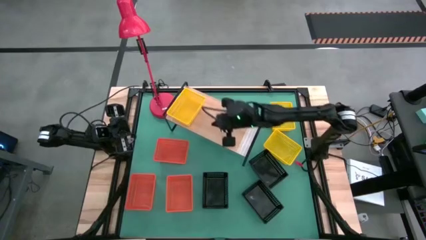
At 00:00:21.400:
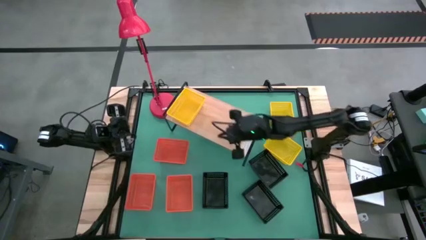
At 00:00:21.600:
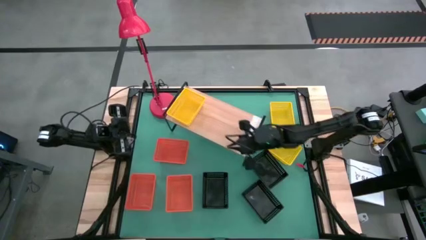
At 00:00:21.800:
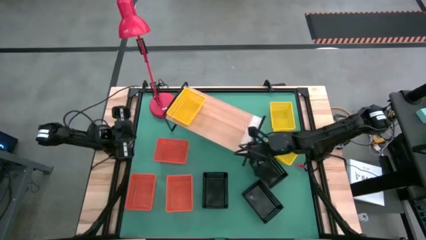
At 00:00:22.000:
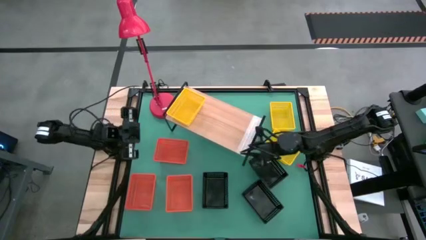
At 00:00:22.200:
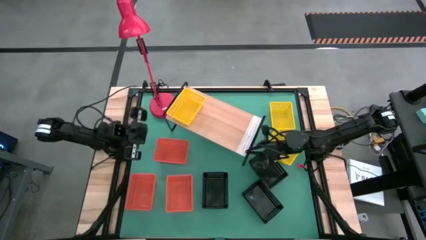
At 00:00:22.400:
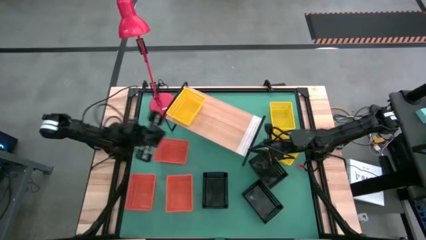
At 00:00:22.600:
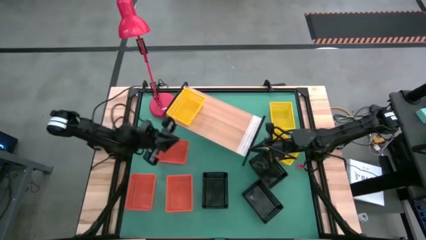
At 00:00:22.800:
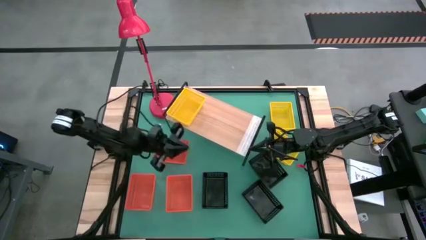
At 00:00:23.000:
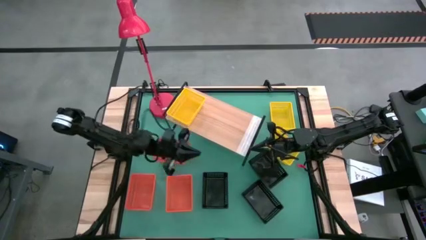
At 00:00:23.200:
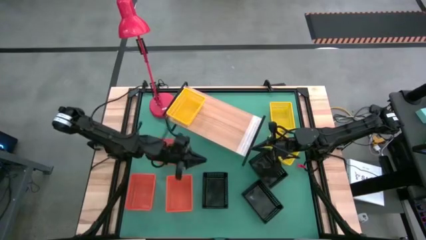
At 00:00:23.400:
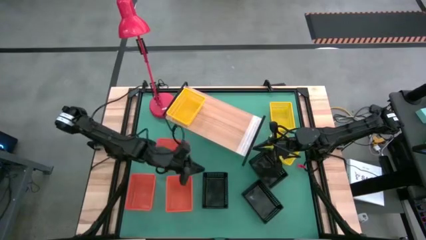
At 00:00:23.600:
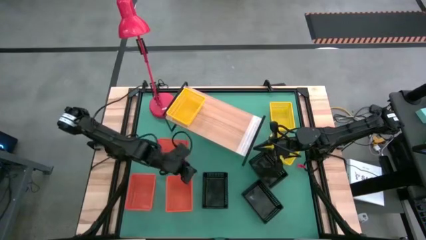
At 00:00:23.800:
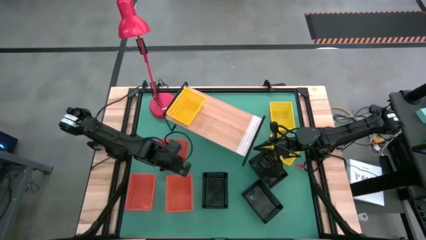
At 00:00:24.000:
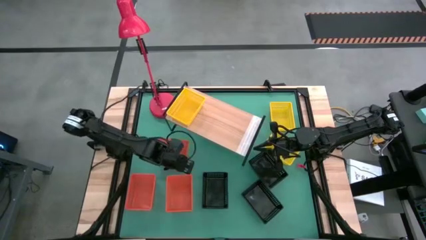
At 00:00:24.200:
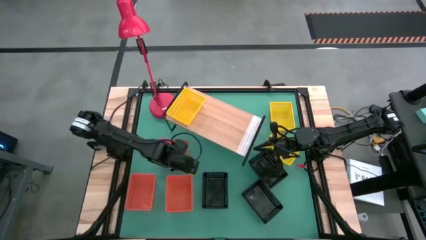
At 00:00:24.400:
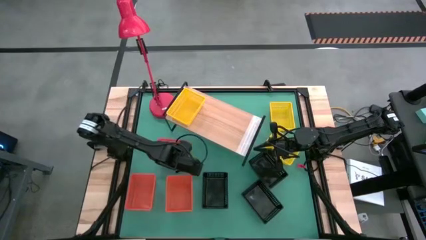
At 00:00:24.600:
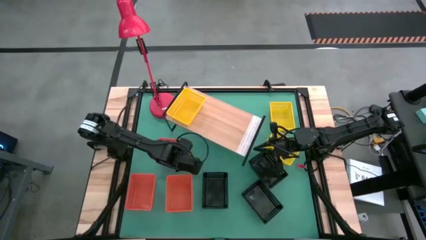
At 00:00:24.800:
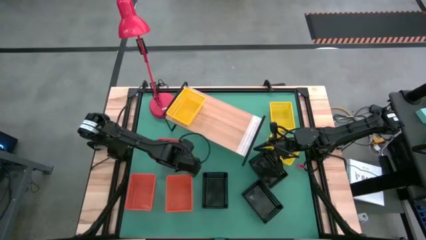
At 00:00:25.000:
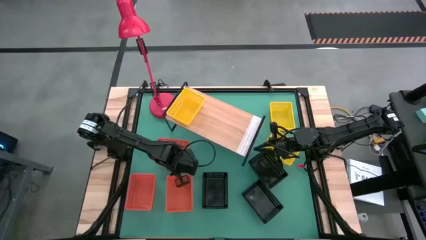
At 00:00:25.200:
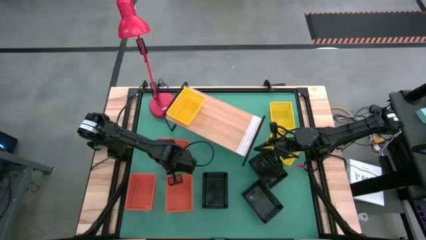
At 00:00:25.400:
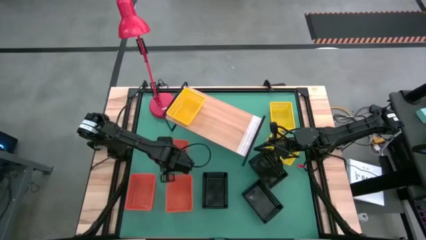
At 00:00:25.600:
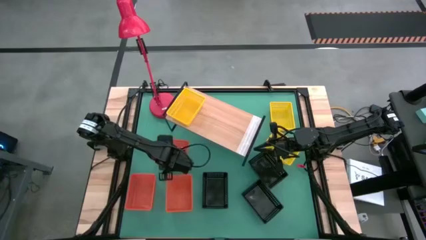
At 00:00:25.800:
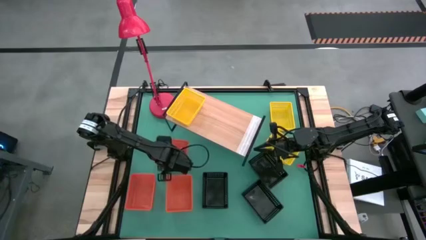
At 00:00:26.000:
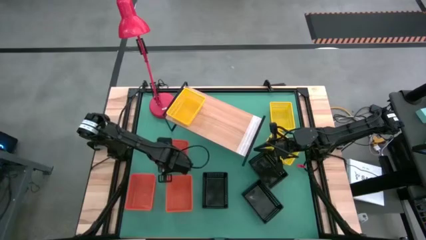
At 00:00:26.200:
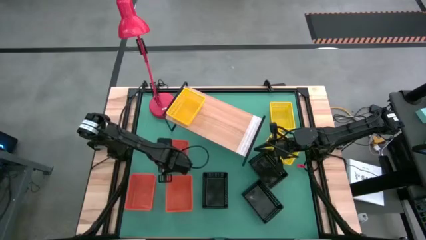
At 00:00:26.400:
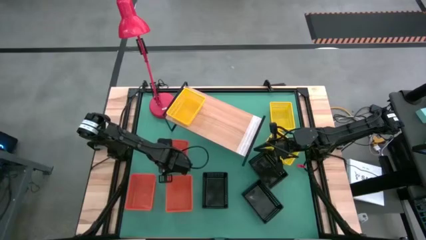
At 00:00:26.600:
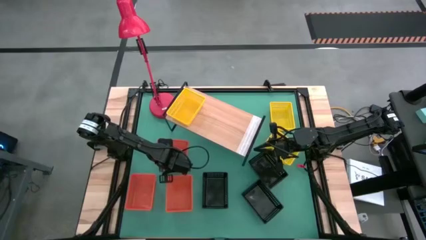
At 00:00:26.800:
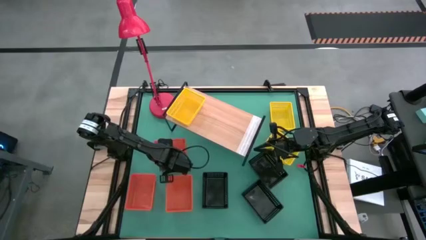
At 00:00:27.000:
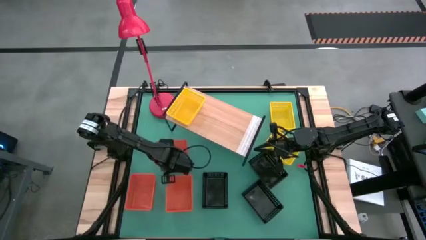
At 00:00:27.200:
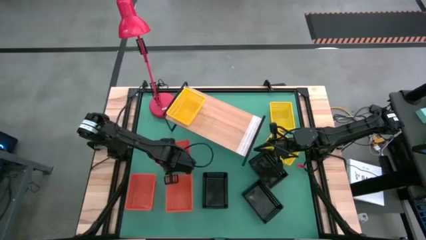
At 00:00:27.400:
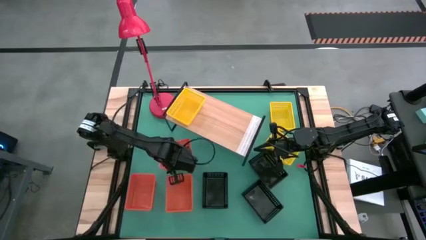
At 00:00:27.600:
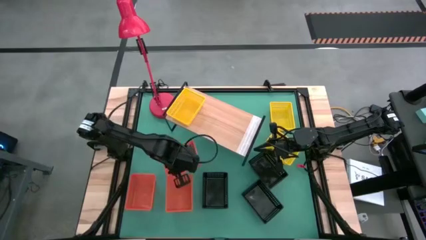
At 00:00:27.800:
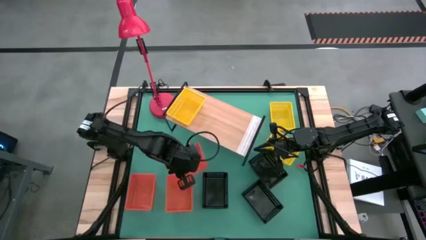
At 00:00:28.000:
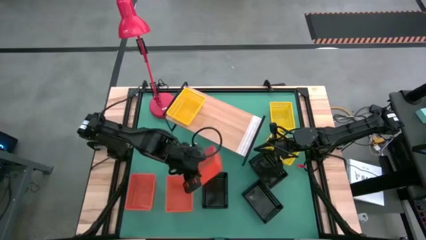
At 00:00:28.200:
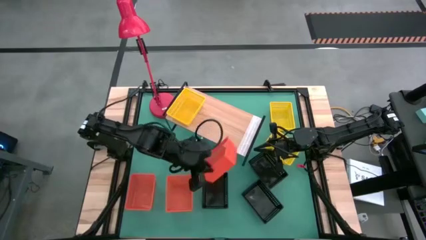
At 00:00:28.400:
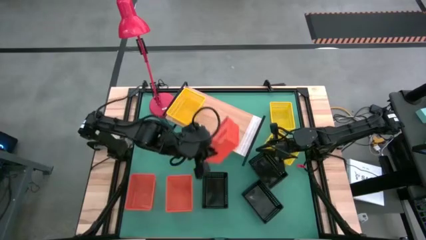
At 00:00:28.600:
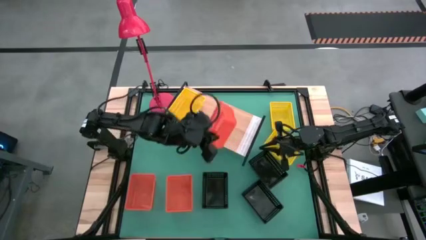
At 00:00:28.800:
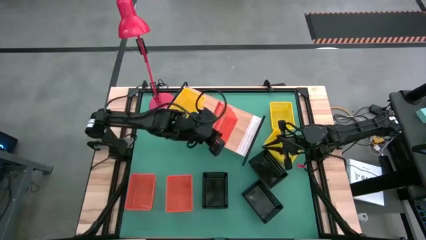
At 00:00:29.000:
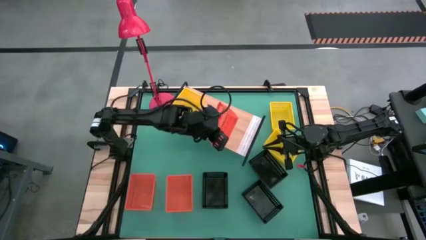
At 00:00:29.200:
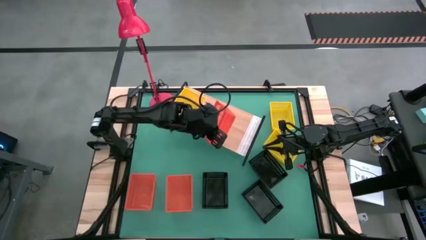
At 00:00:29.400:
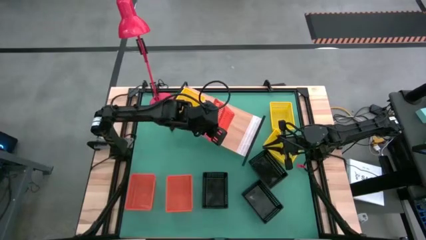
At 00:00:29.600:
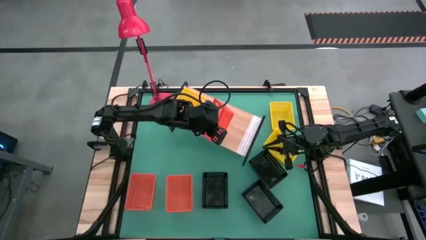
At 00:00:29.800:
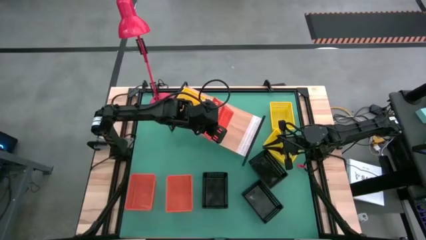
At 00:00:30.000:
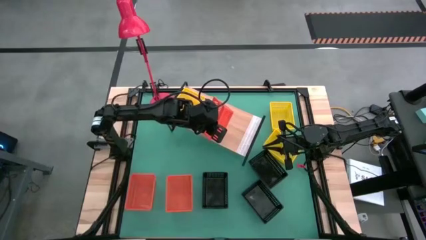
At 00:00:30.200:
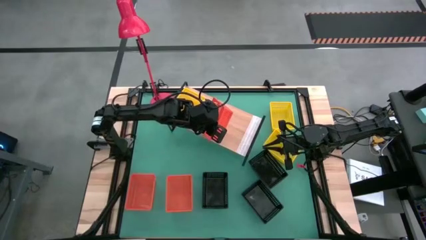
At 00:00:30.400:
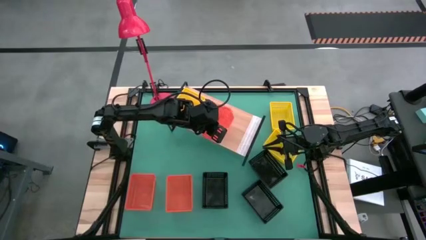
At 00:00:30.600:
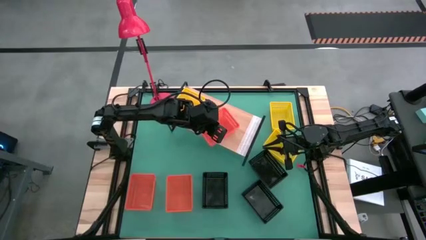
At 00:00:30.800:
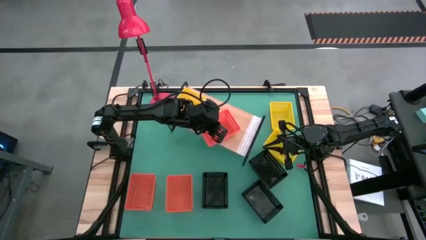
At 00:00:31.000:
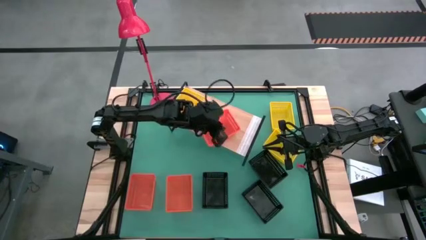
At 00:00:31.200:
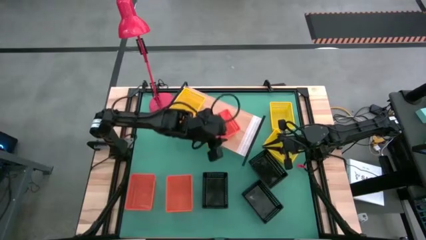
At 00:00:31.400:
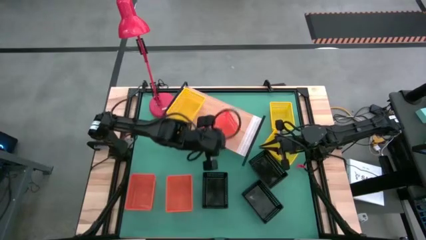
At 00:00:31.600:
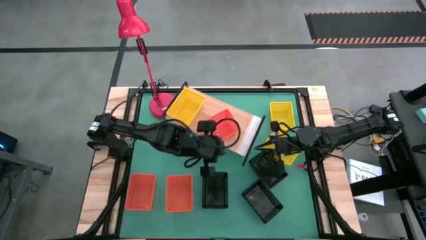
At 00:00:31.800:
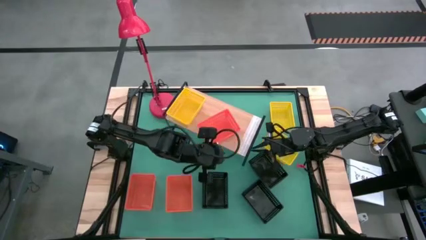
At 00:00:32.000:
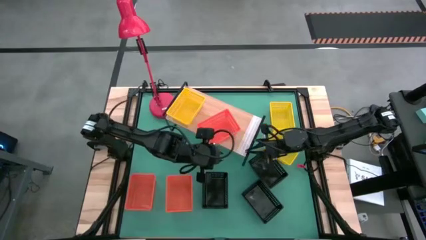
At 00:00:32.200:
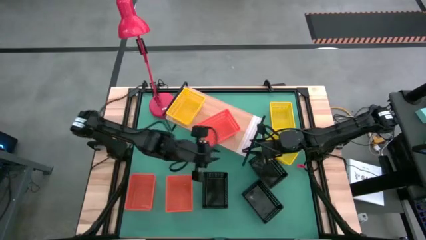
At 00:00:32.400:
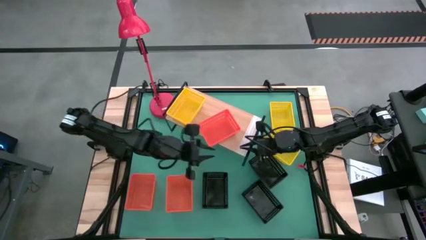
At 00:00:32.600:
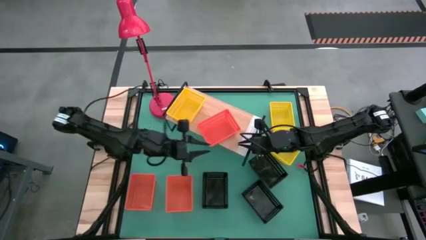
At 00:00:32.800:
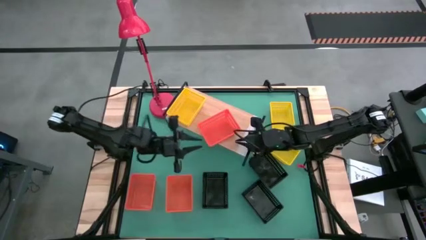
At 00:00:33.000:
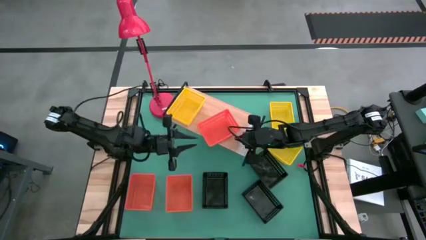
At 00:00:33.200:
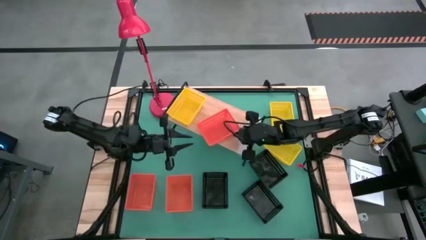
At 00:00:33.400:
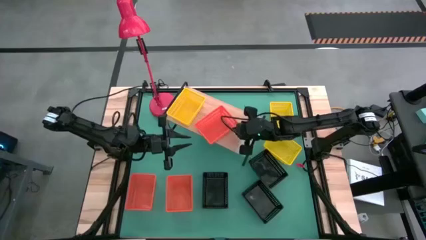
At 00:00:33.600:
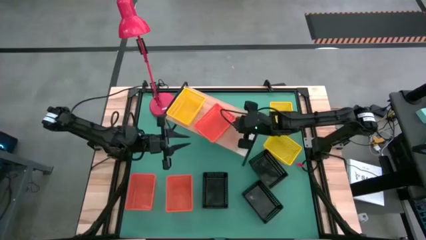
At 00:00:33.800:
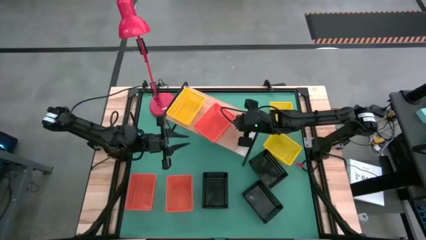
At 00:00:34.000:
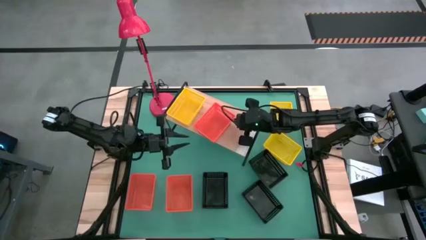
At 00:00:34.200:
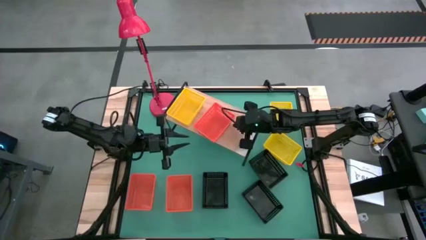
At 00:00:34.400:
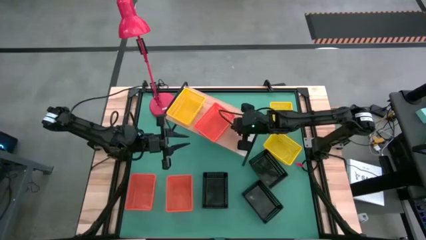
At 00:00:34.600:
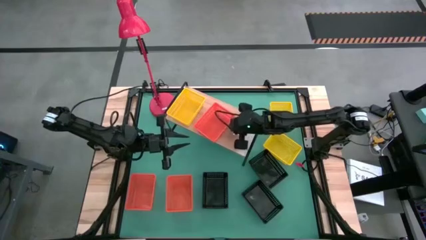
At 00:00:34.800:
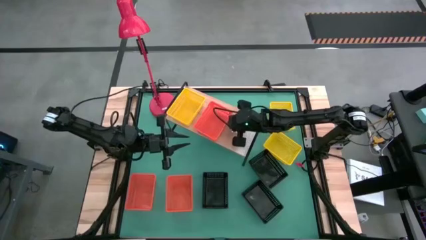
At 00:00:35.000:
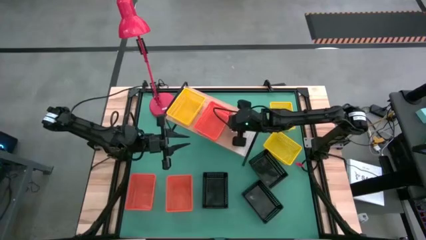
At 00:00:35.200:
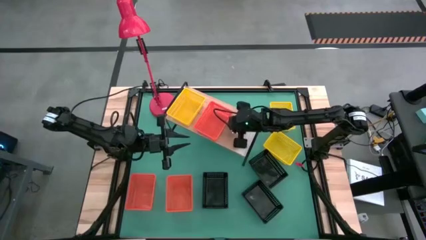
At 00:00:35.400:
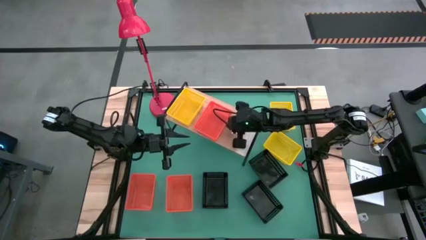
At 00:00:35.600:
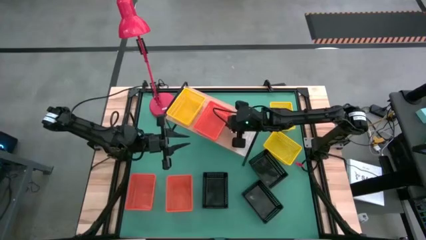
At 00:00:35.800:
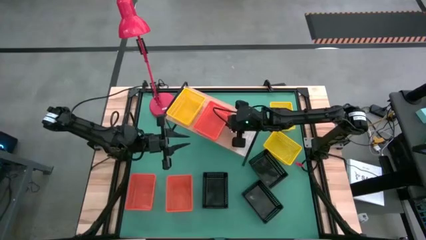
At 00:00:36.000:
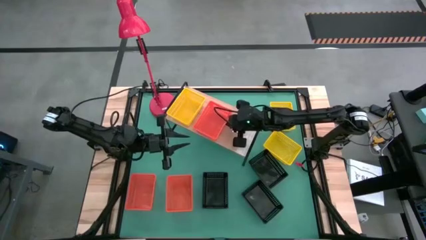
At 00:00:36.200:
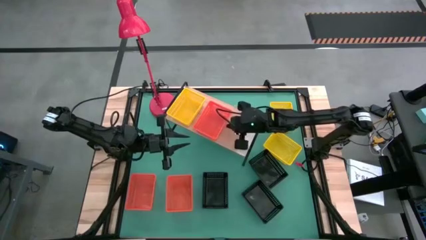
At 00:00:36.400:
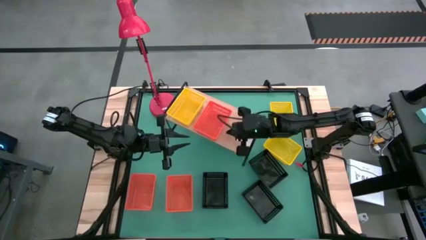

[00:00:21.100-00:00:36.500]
Task: Stack baskets on shelf by color
Put the top orange bin on the shelf
